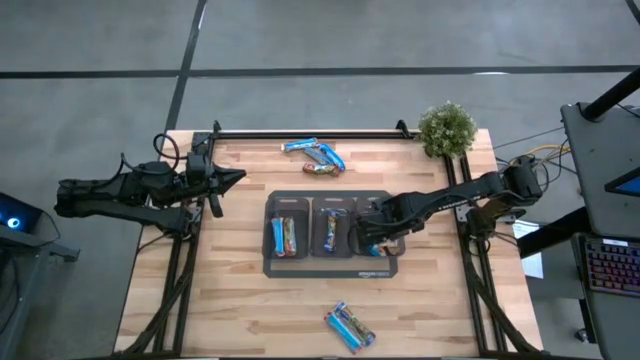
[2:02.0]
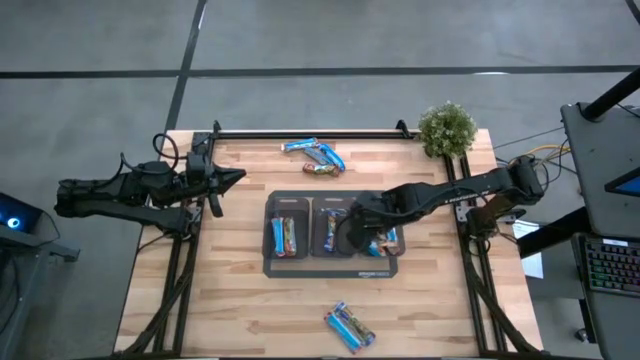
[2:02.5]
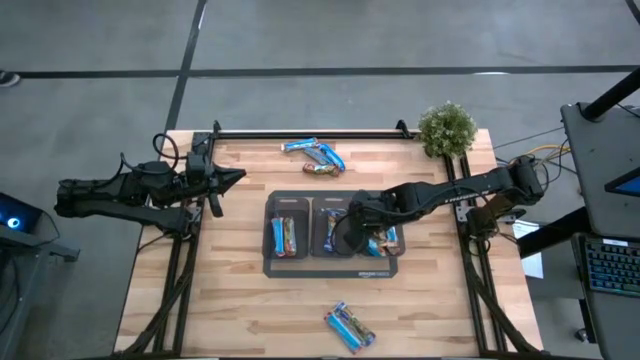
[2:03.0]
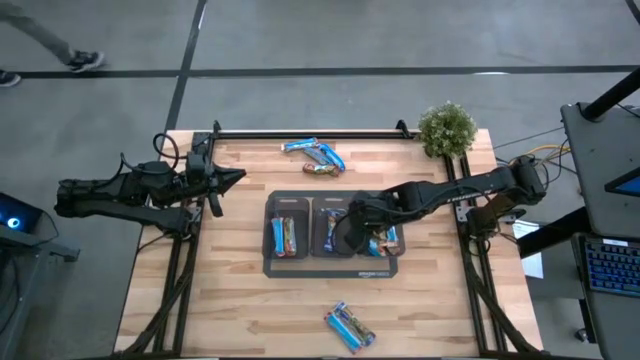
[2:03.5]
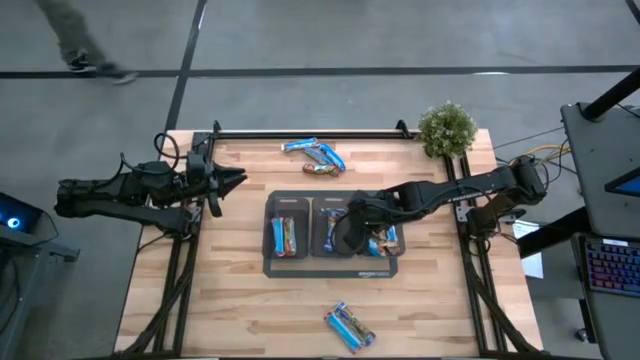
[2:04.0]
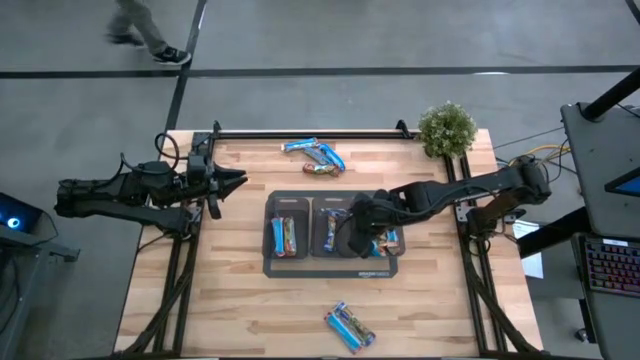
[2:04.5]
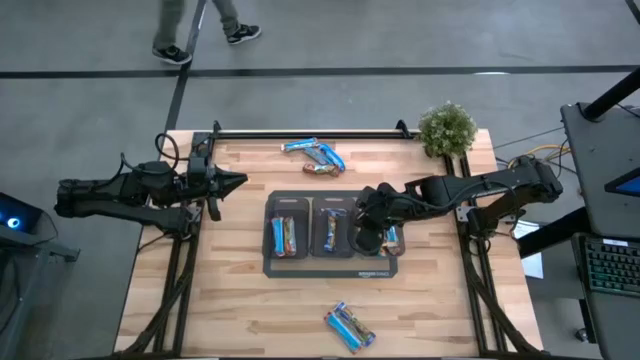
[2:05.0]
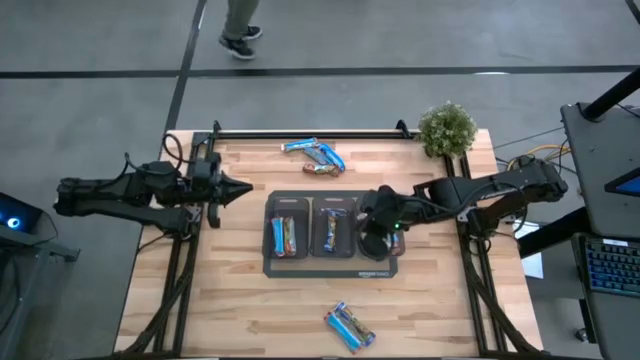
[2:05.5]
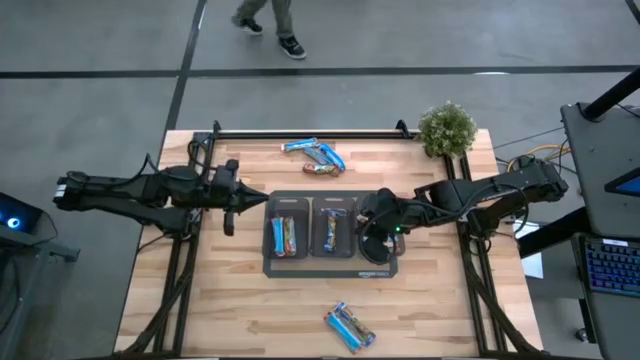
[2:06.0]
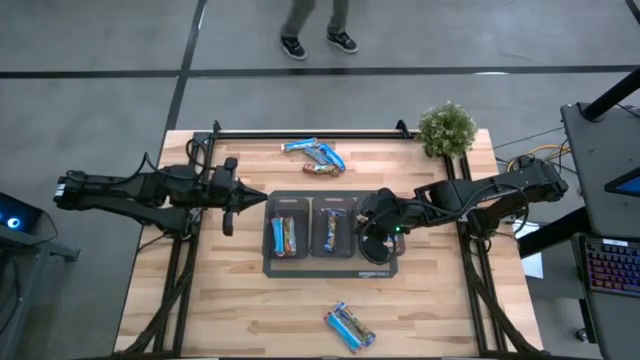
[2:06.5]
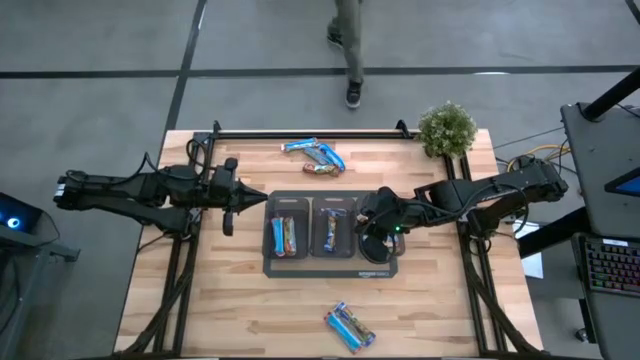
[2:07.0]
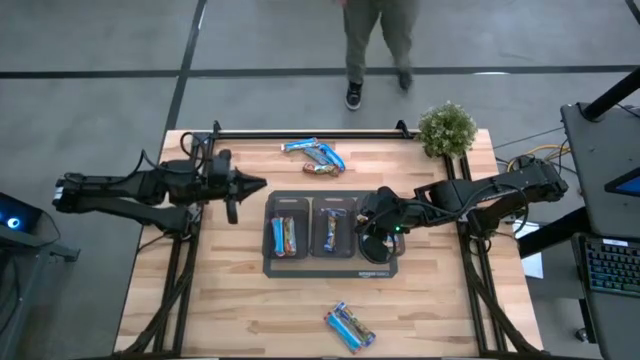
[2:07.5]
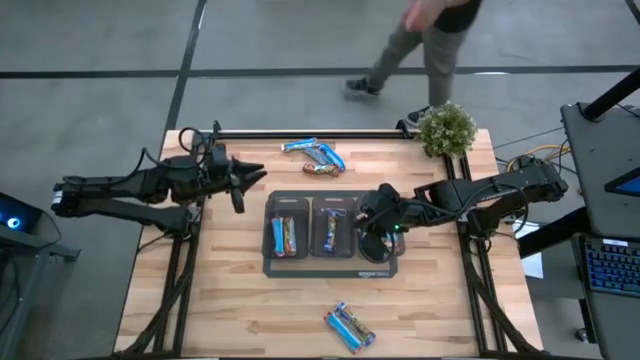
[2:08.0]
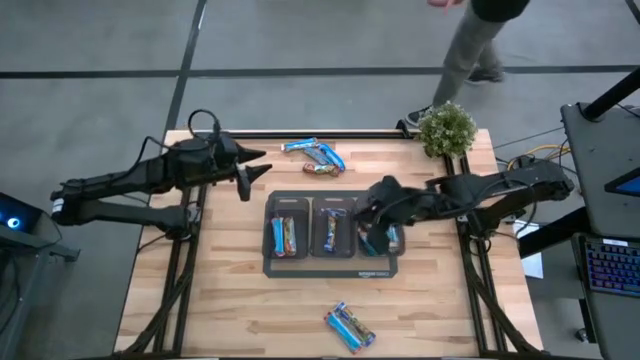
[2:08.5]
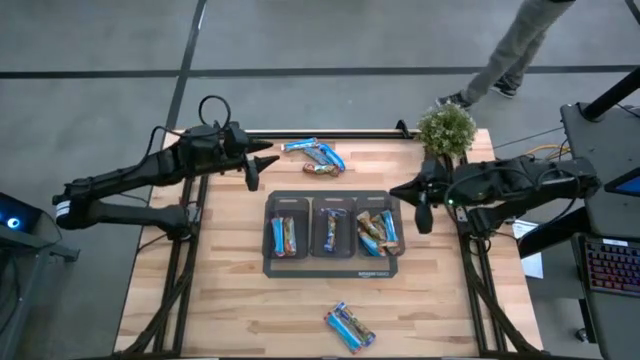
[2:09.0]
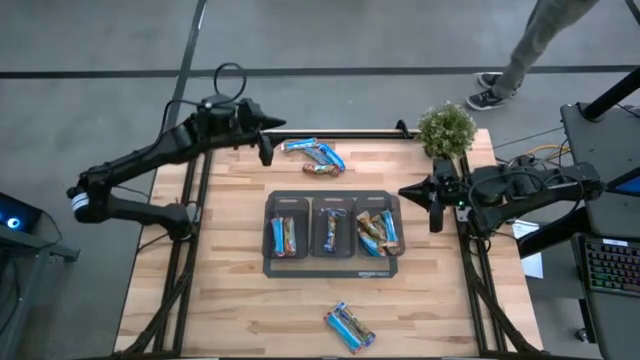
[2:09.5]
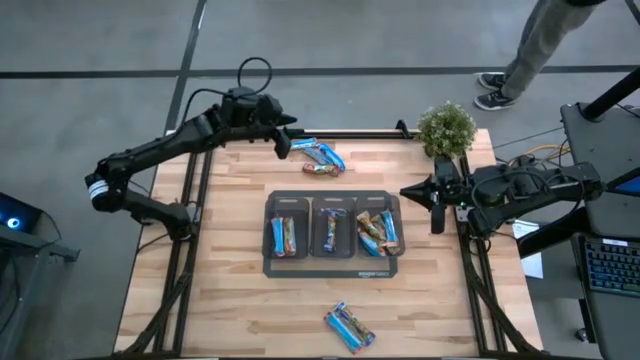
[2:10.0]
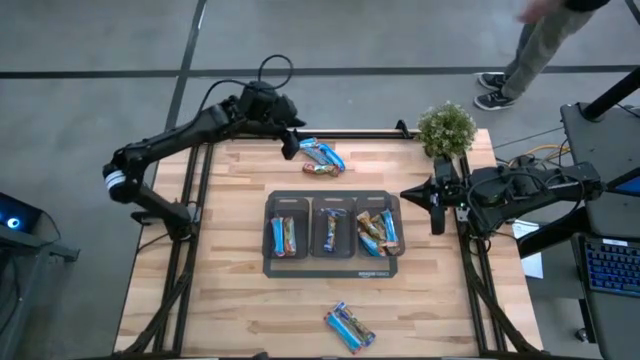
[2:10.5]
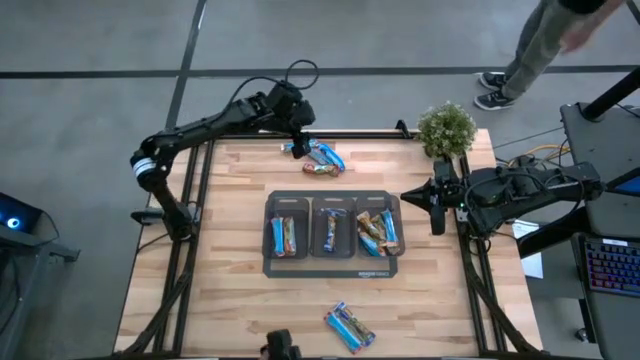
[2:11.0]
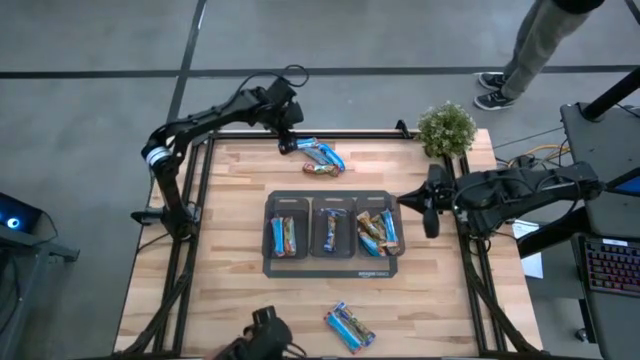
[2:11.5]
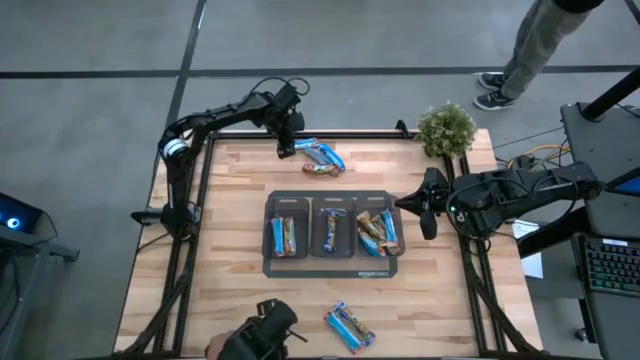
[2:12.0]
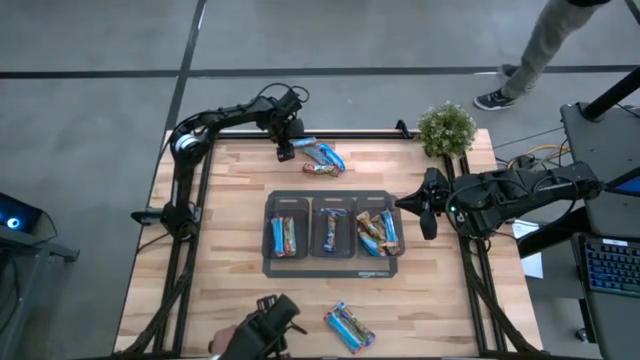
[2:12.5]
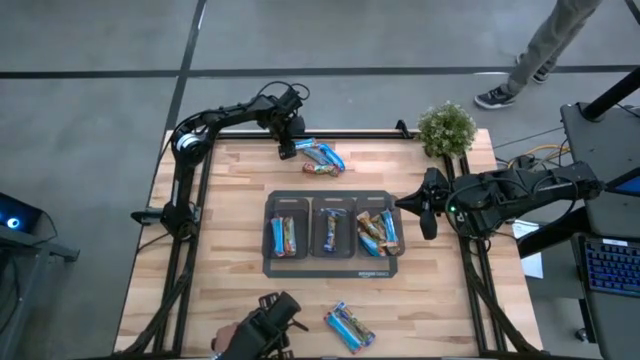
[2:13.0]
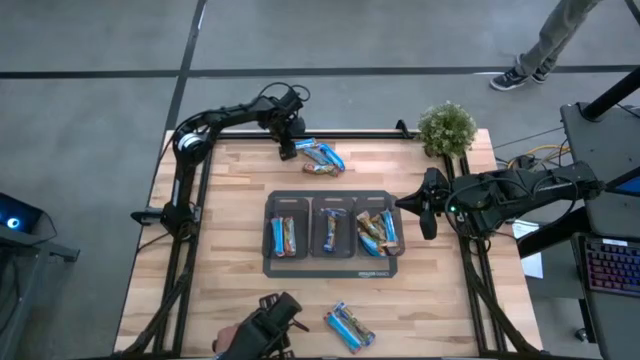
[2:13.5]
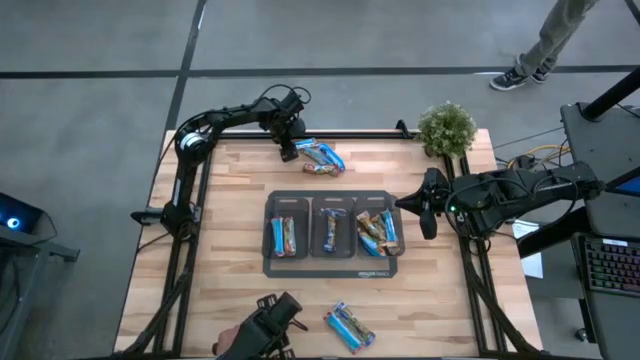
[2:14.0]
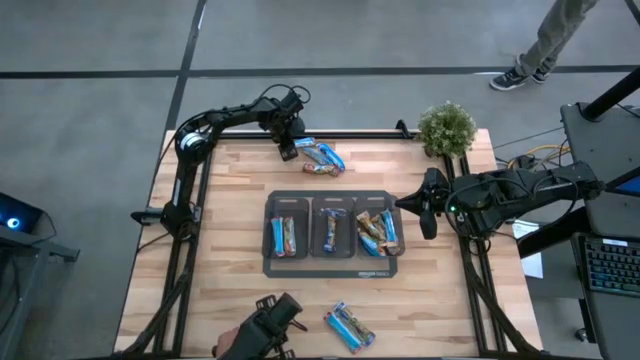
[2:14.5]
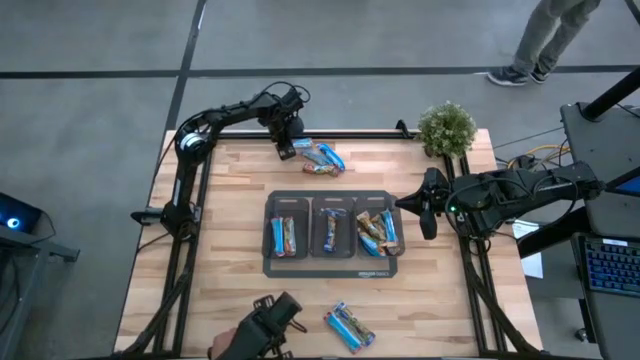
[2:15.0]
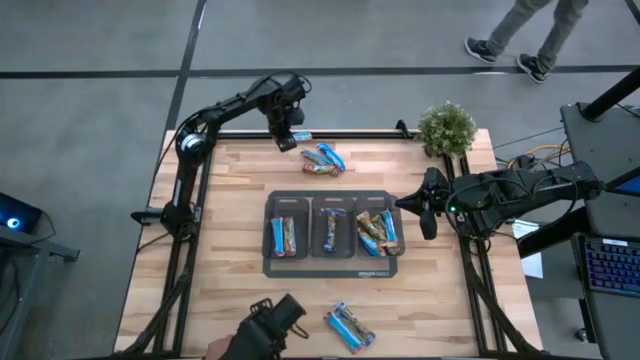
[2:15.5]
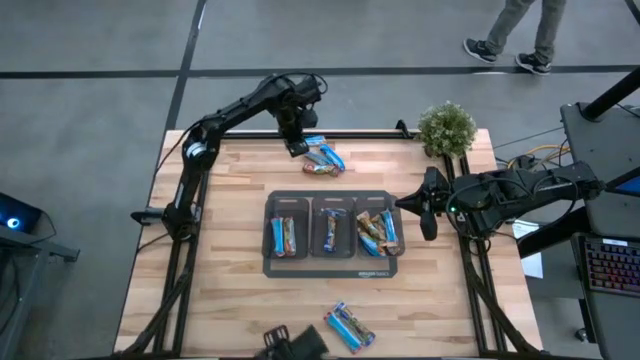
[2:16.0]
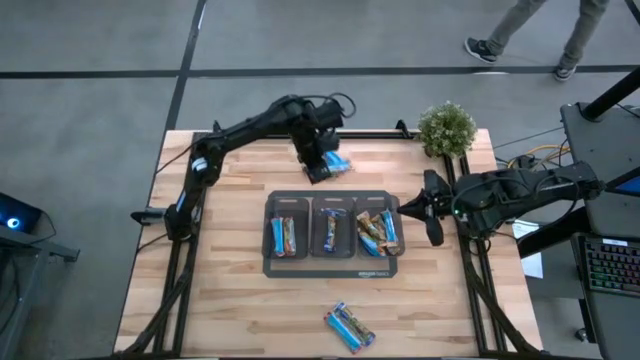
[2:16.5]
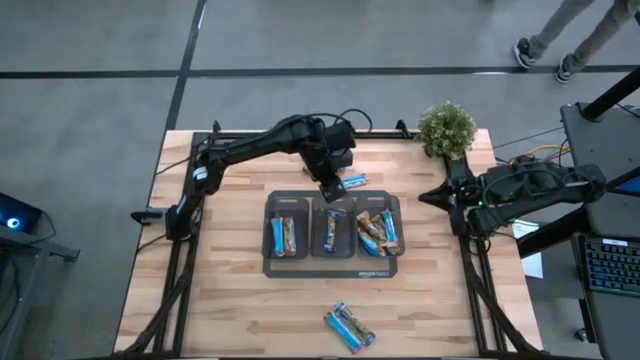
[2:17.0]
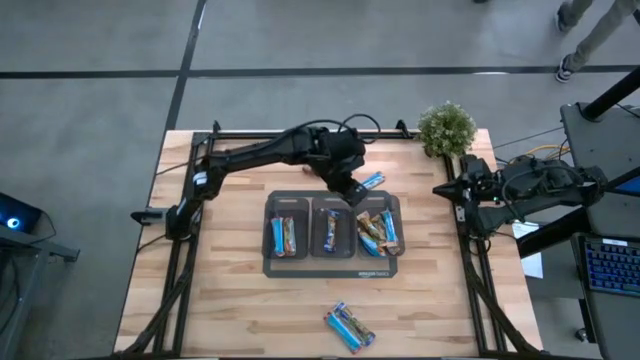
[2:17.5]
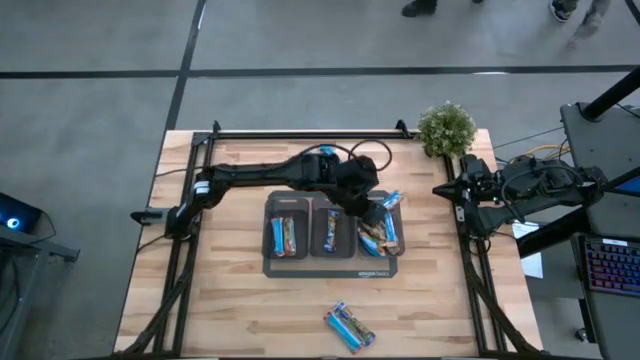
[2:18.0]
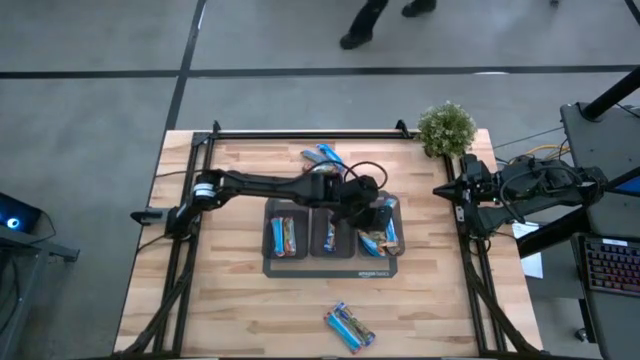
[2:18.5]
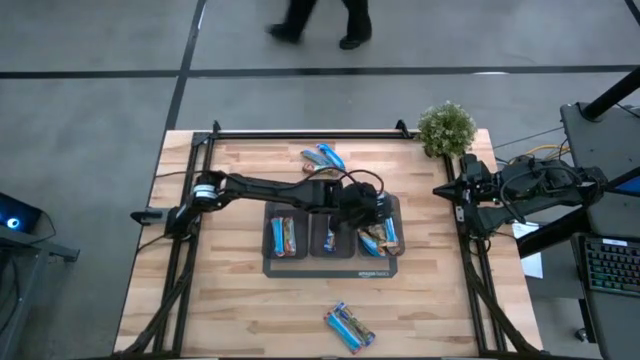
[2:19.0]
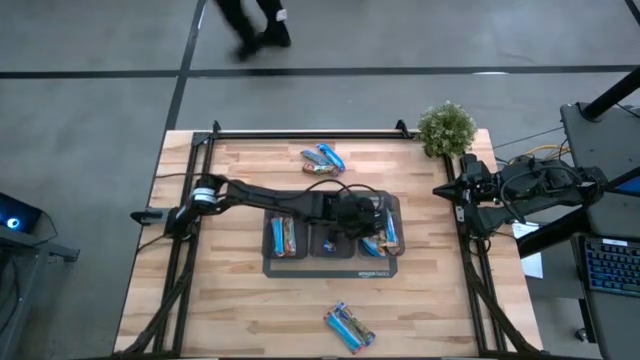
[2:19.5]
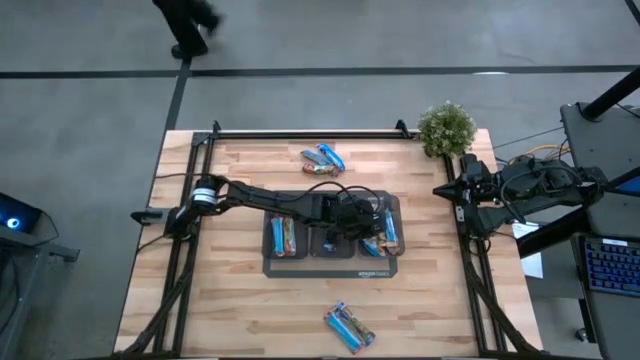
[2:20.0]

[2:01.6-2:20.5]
Task: Pick and place Granola Bars by type
Put the yellow granola bar into the right black bin
